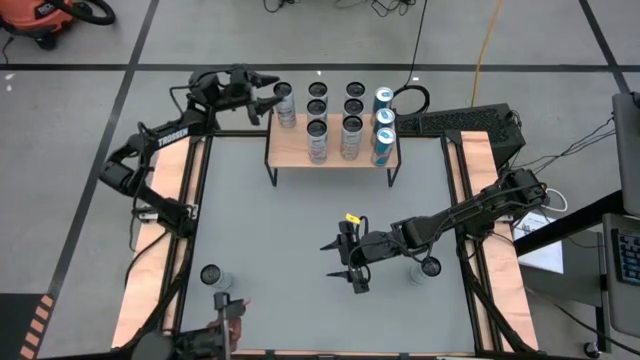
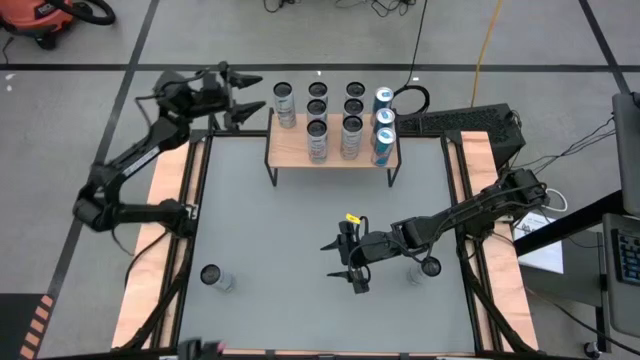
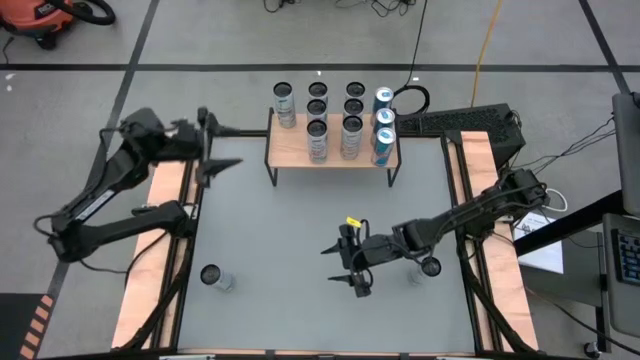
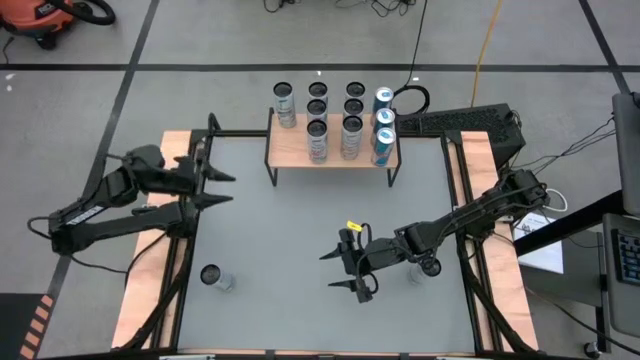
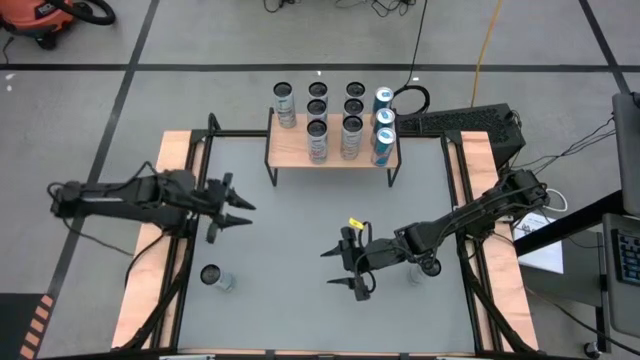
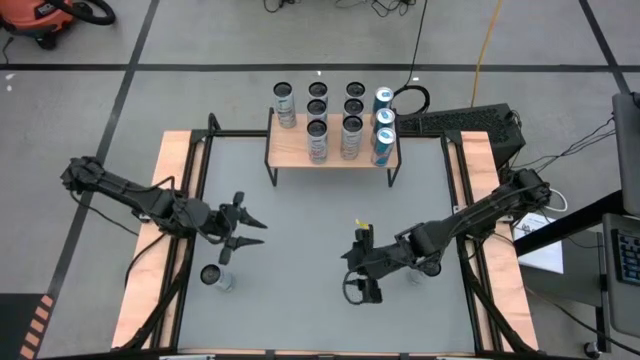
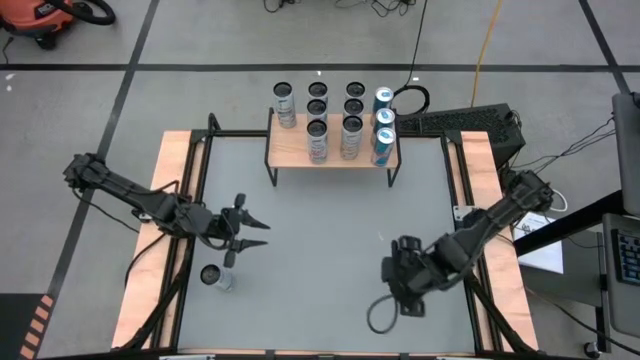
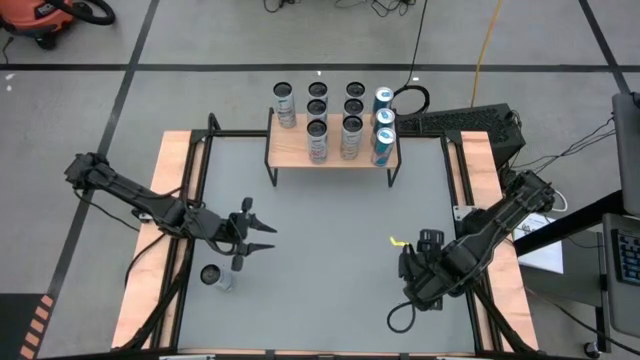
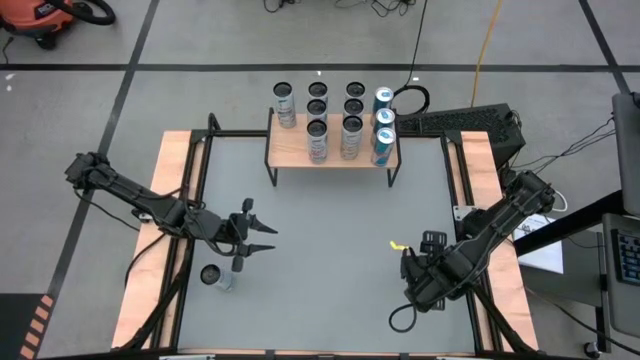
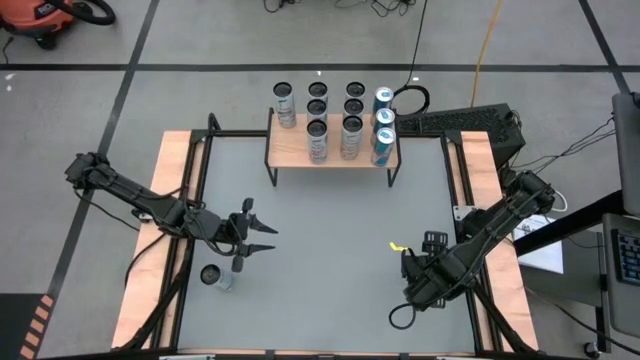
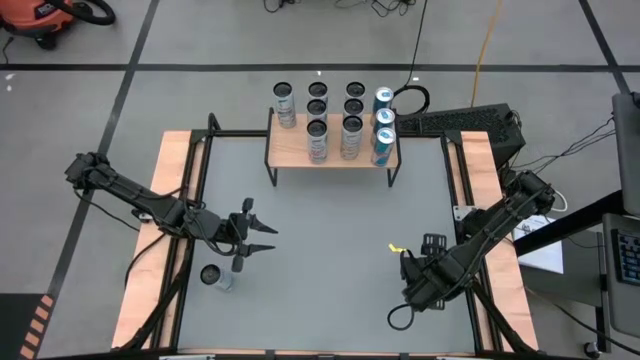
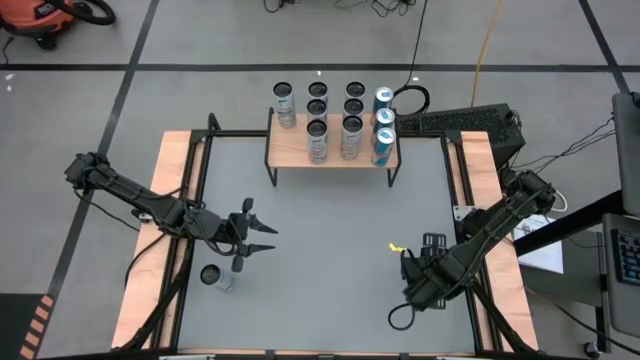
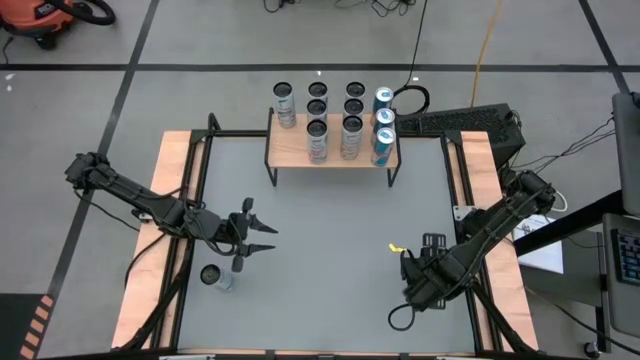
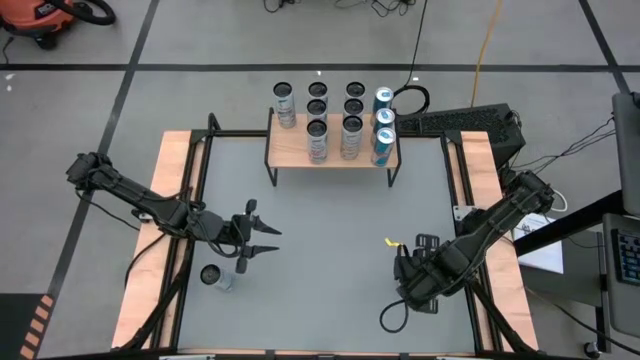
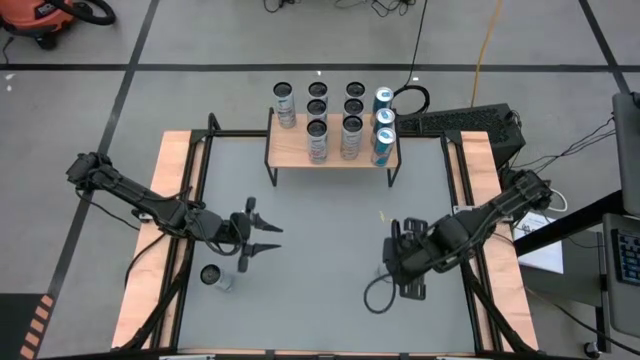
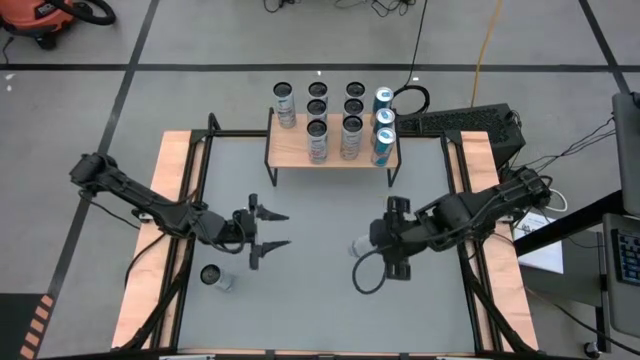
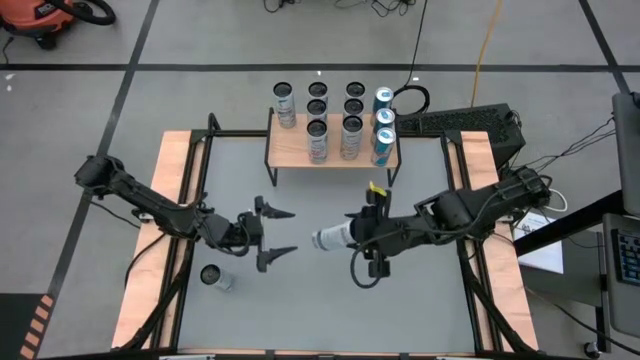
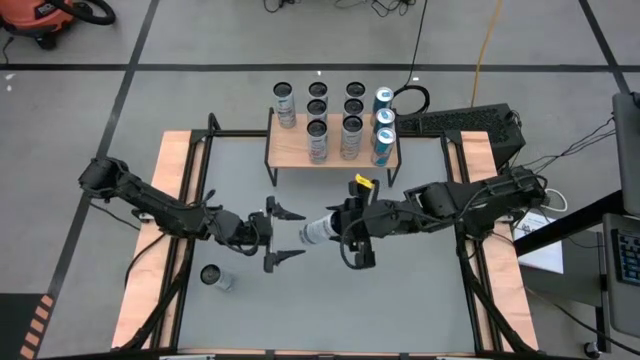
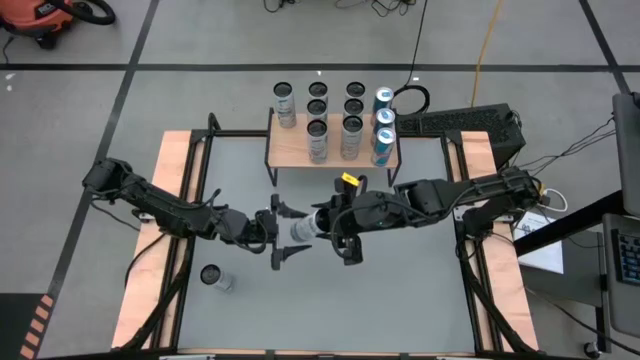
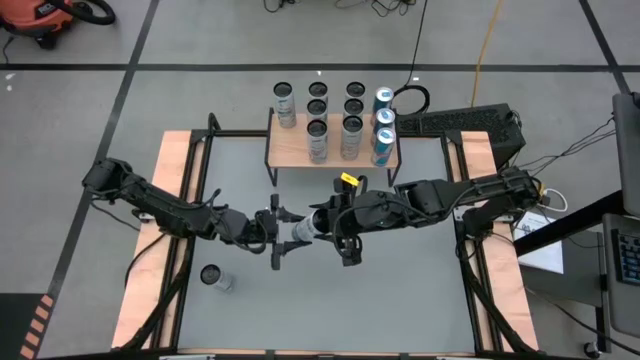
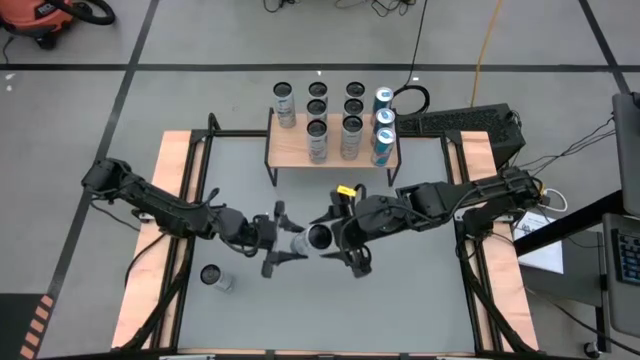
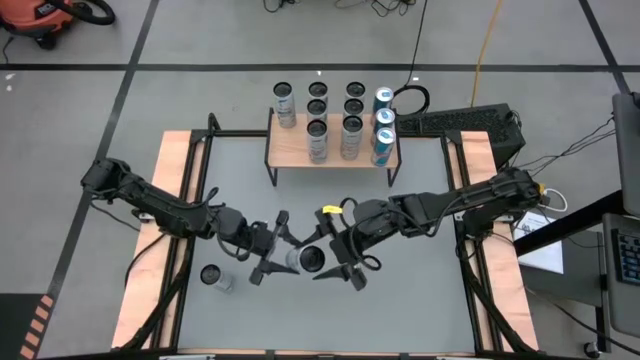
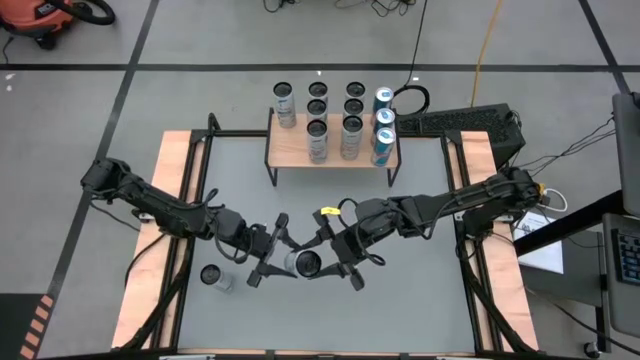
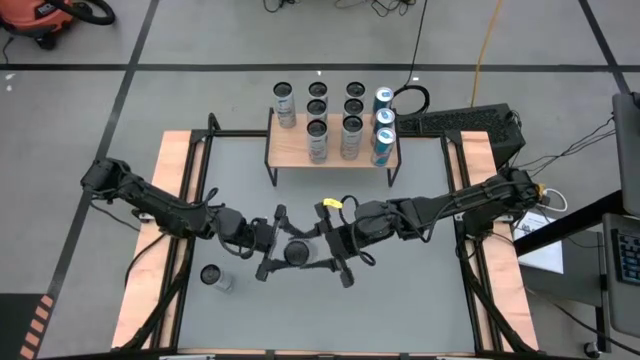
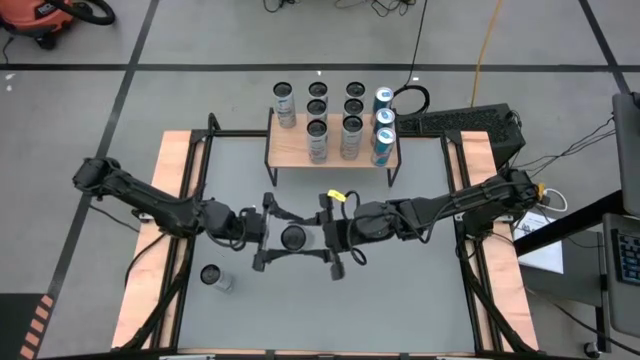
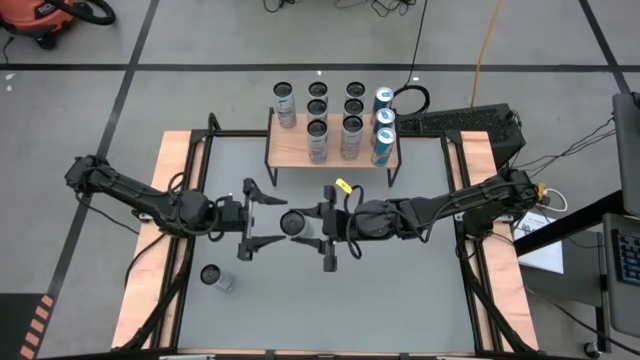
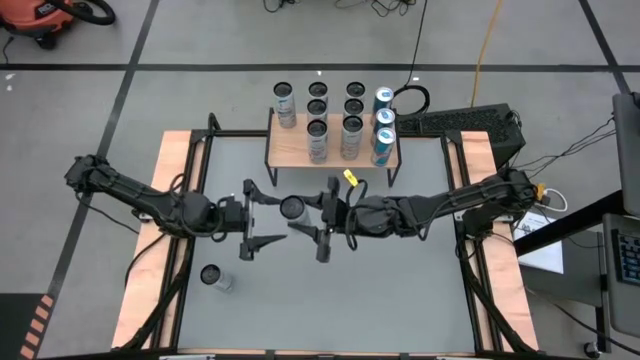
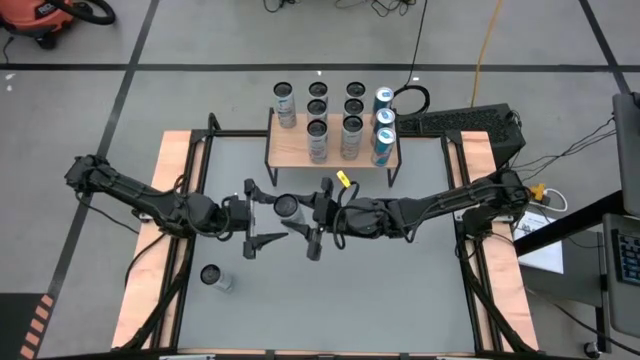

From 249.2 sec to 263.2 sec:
Task: Place canned beverage on shelf
Put the right white blue soda can on the shelf aligned with the other white blue soda can

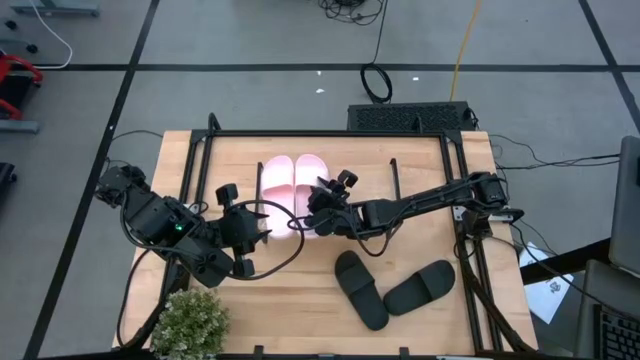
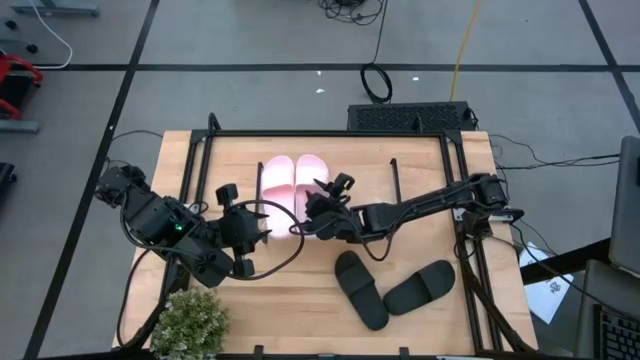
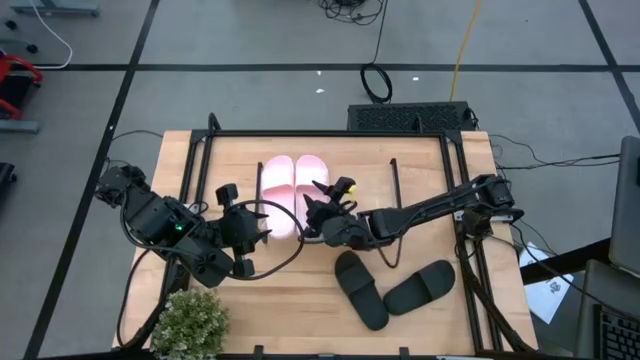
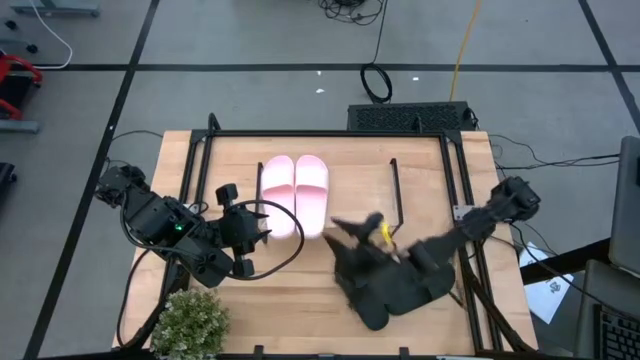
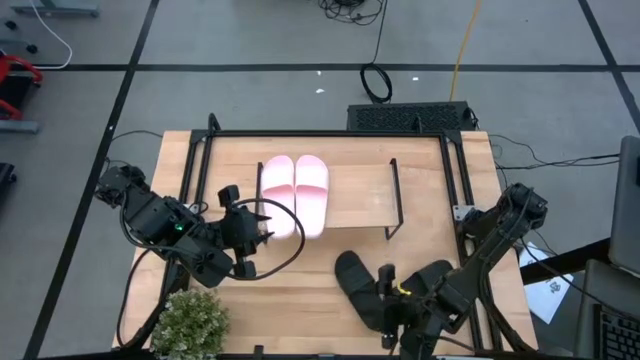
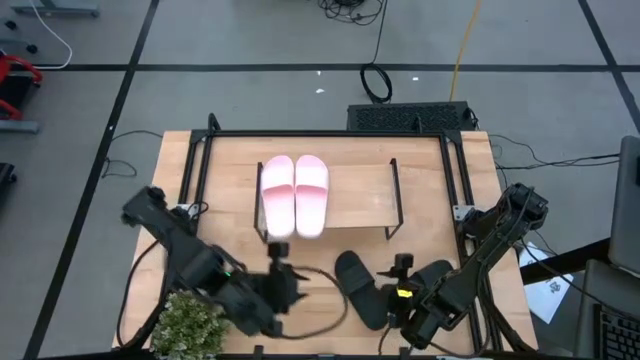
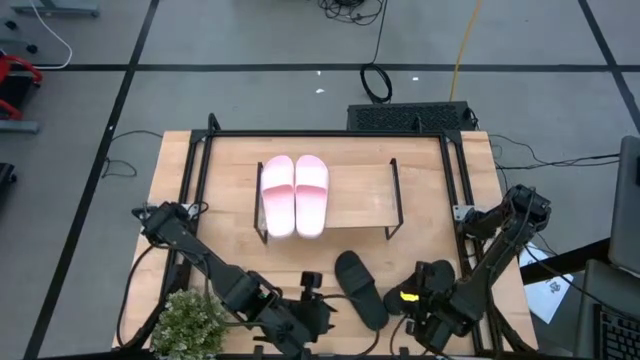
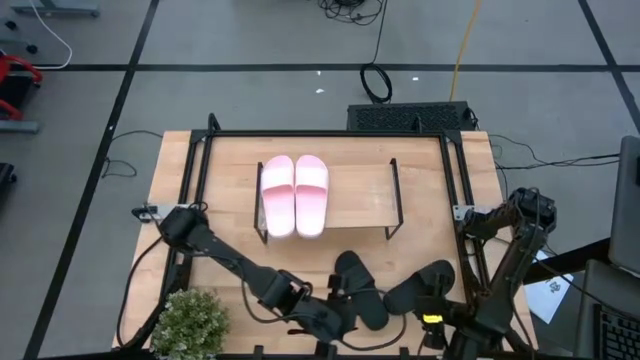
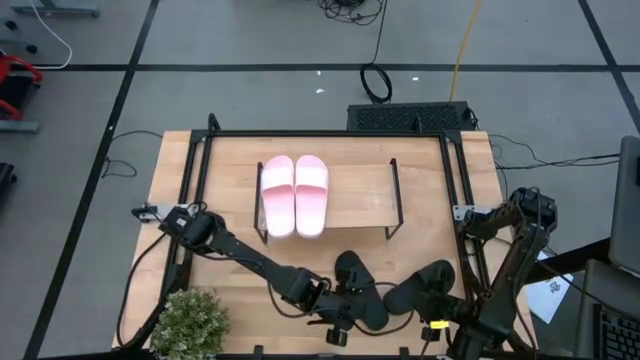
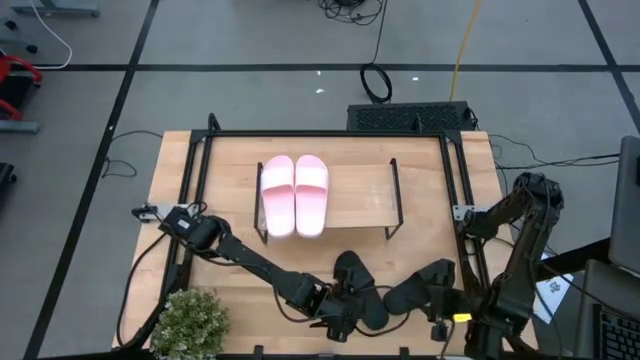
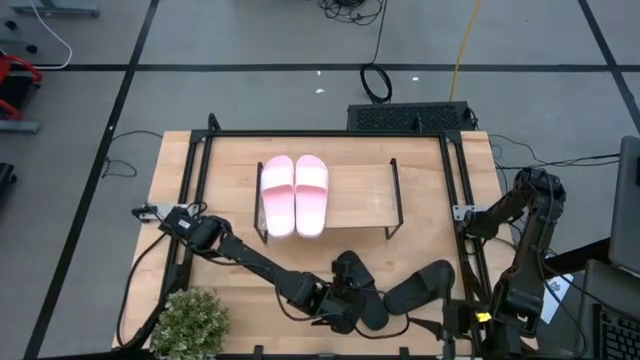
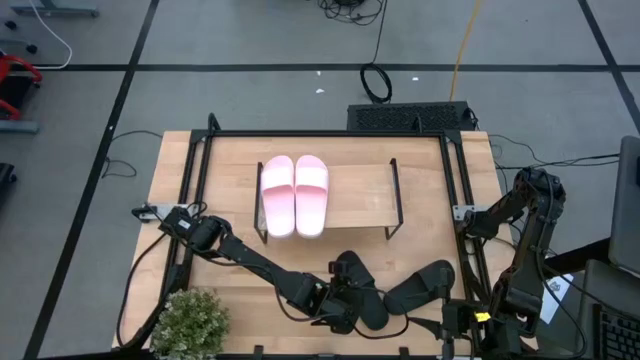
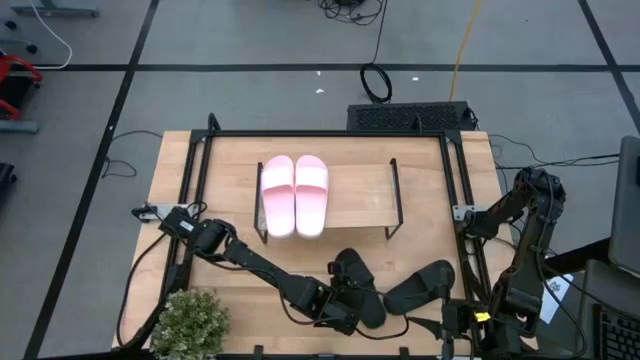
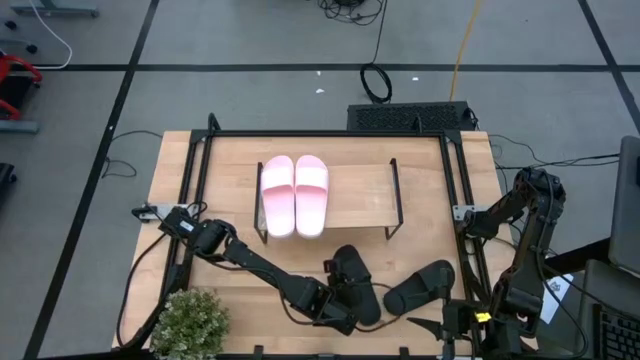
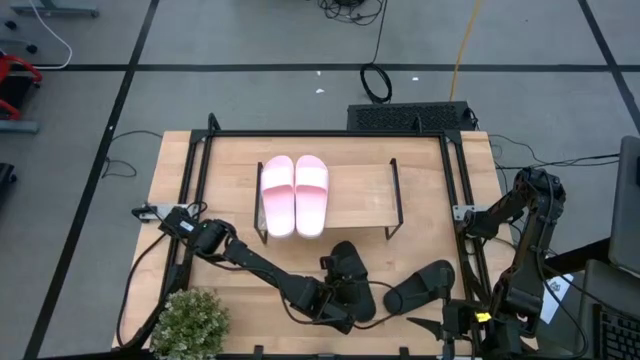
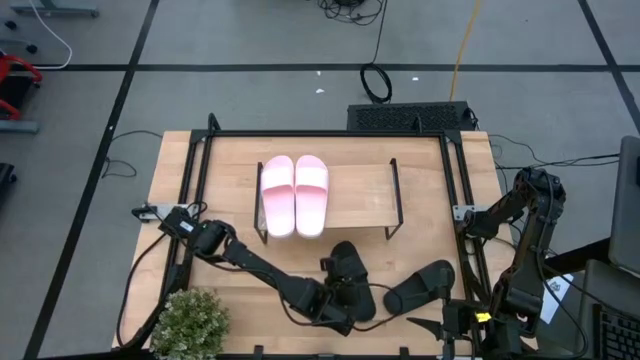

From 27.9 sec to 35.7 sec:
Task: Pick and place slides into the shelf
Put the left black slipper on the shelf
